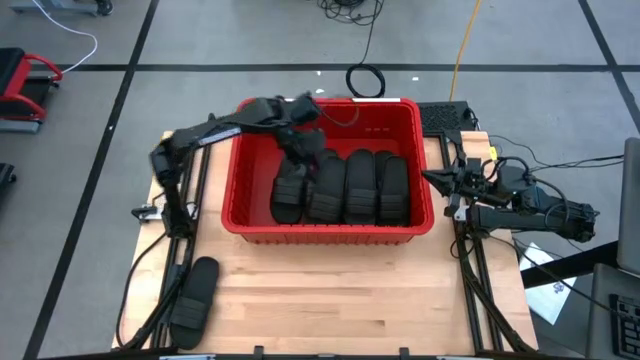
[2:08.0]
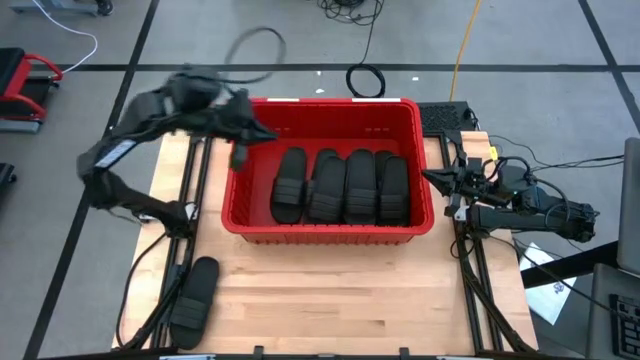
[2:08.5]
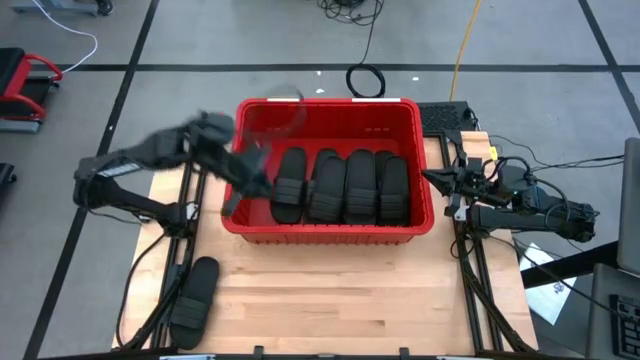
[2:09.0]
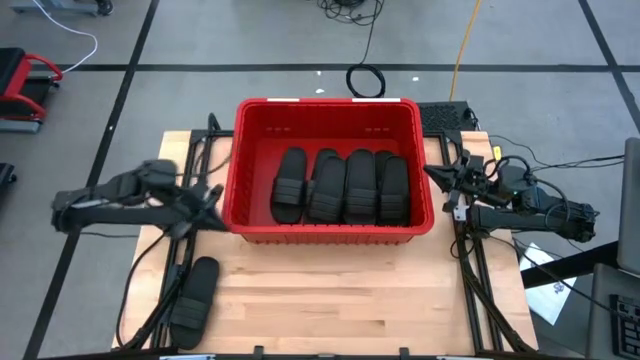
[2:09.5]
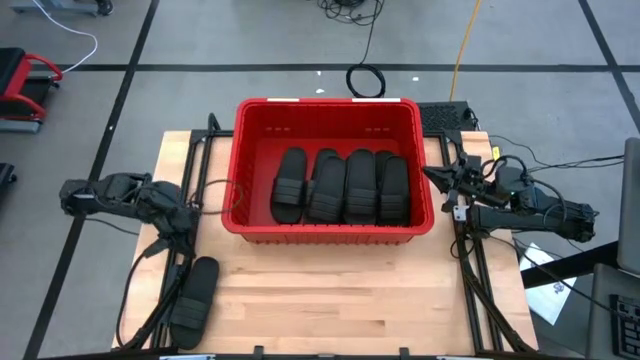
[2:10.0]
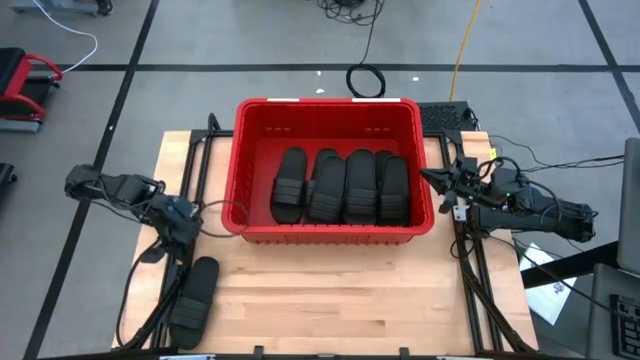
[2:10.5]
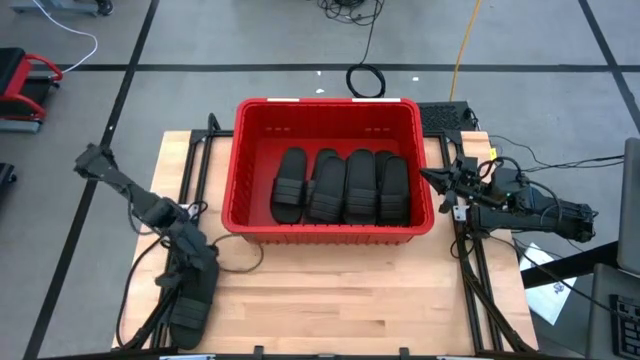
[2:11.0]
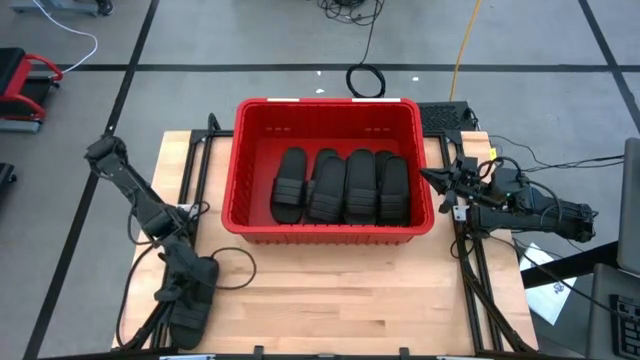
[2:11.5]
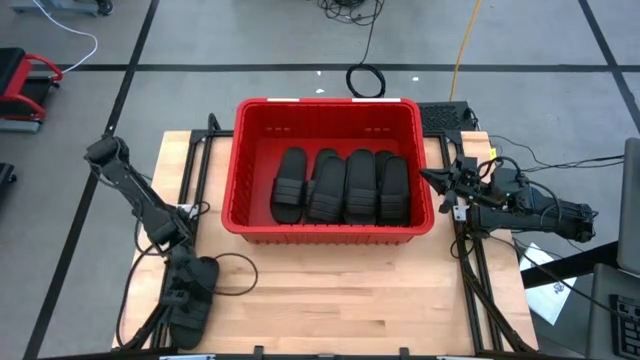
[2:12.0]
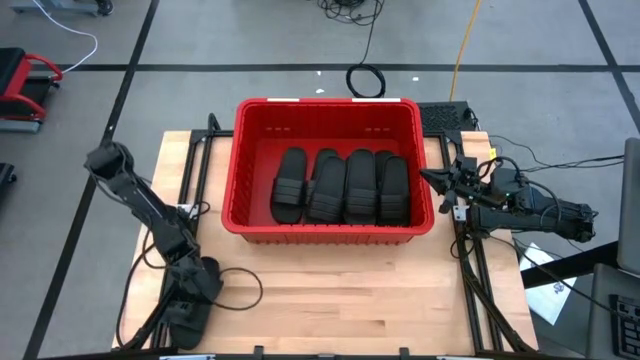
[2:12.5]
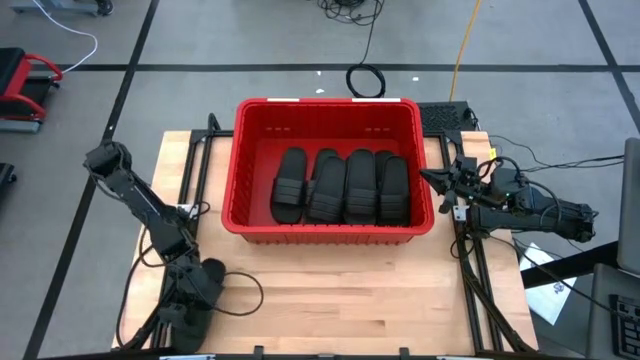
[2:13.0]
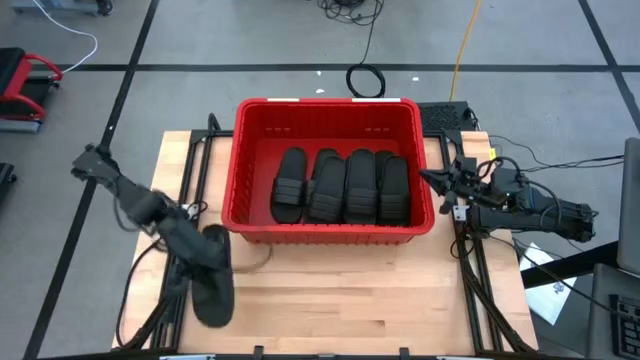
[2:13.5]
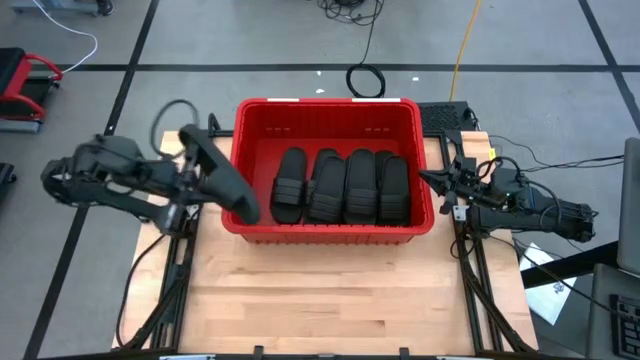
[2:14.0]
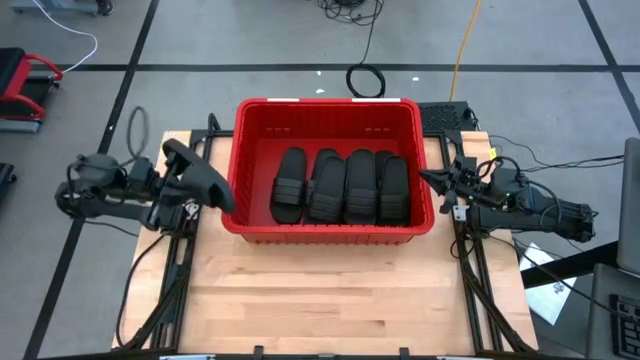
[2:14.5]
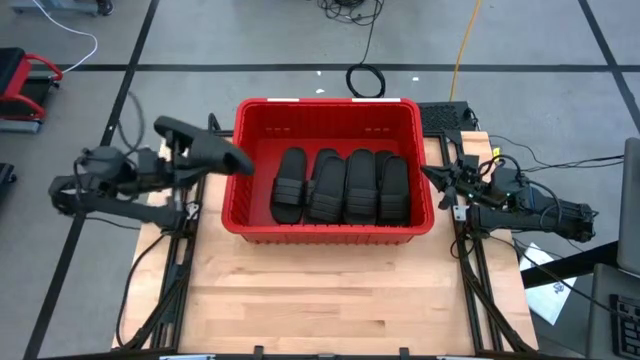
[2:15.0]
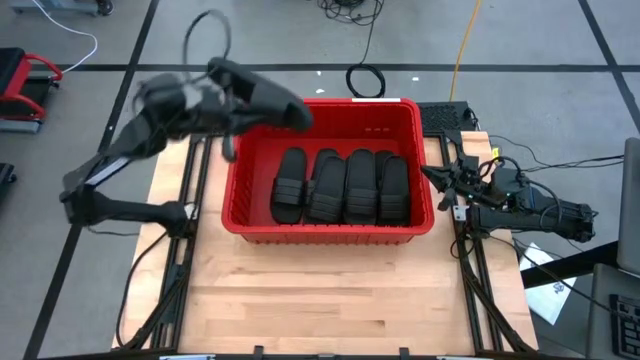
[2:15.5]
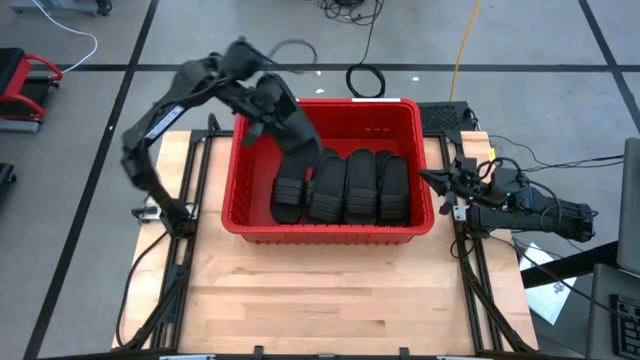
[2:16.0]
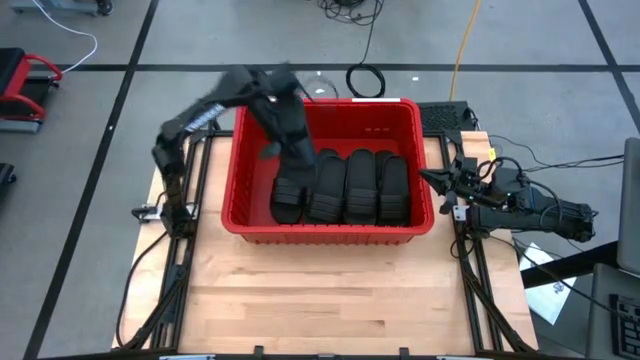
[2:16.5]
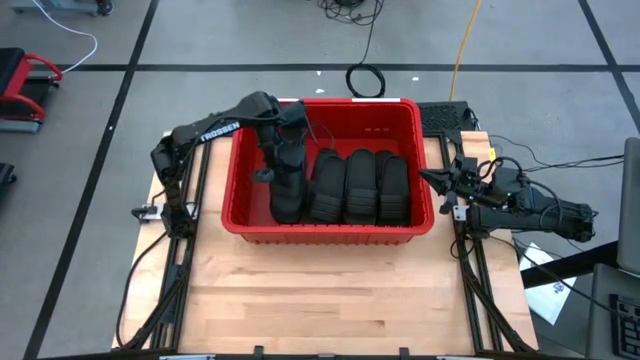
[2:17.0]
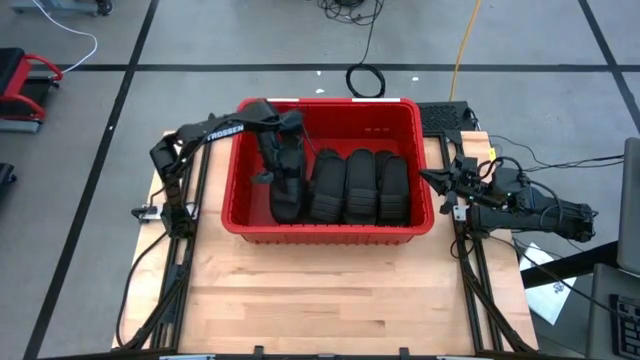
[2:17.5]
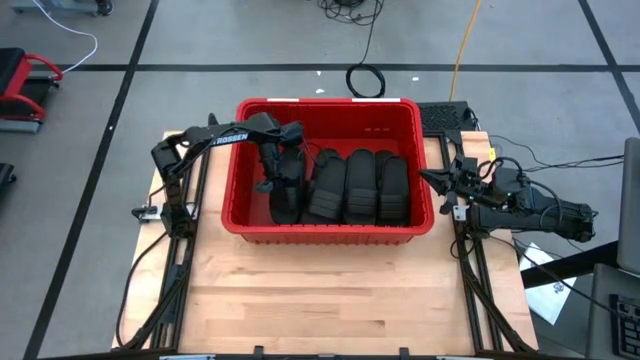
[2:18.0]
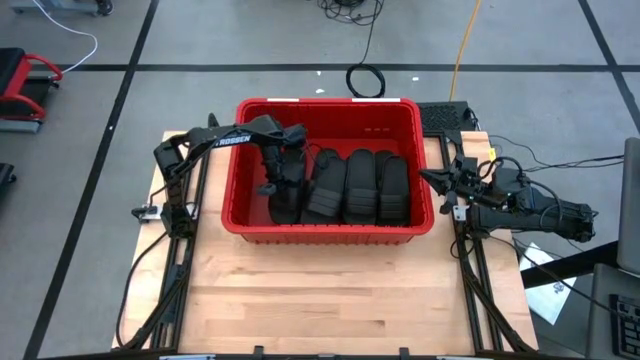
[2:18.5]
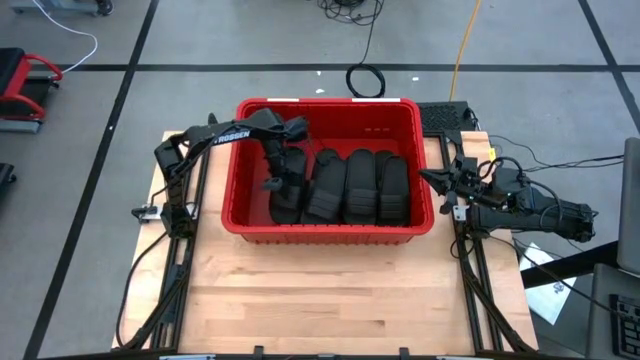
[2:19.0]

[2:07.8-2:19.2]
Task: Pick and place slides into bin
Put the black slide into the red bin

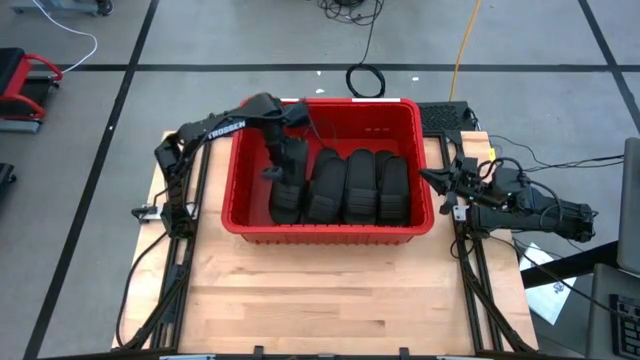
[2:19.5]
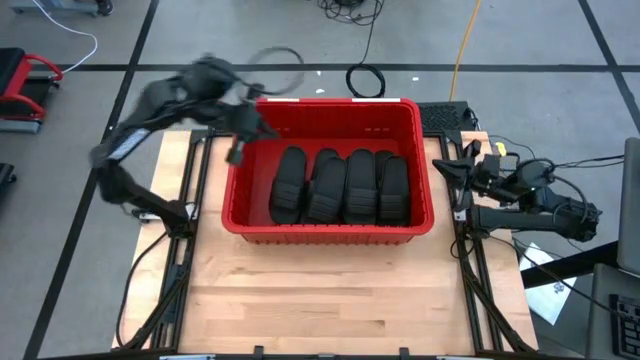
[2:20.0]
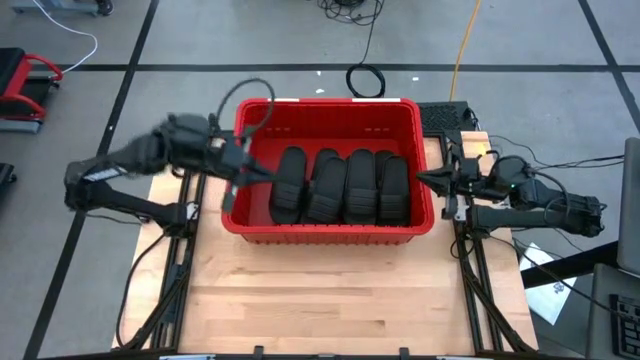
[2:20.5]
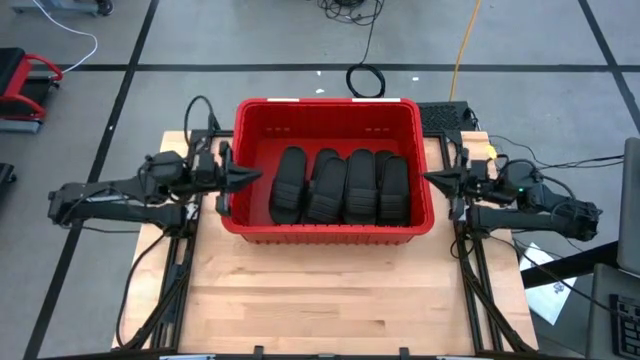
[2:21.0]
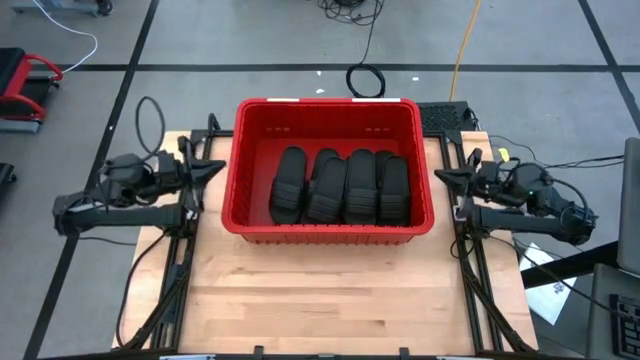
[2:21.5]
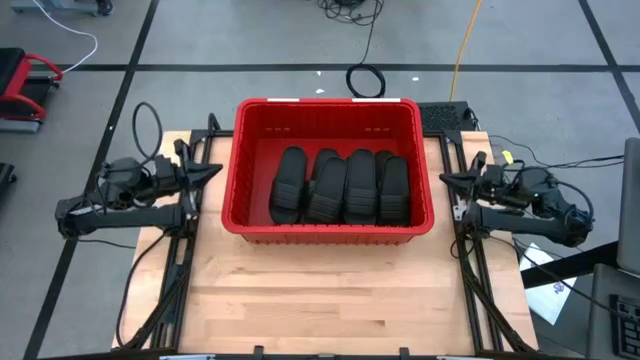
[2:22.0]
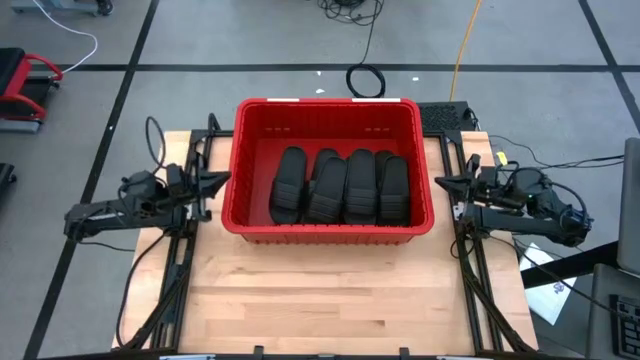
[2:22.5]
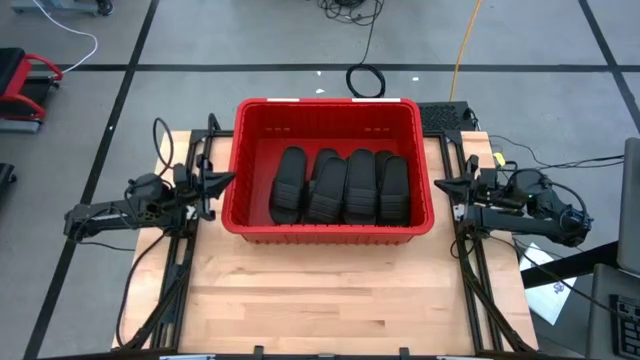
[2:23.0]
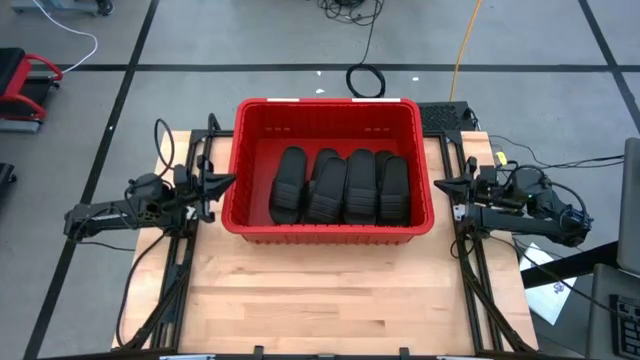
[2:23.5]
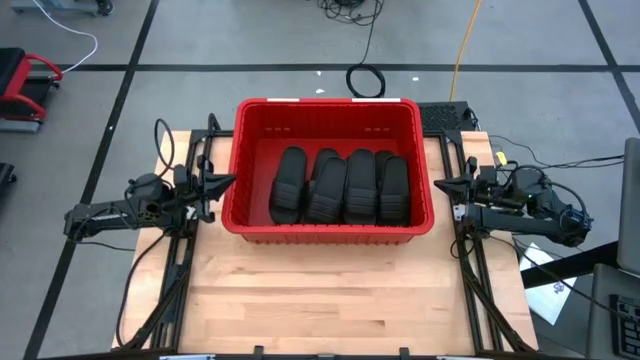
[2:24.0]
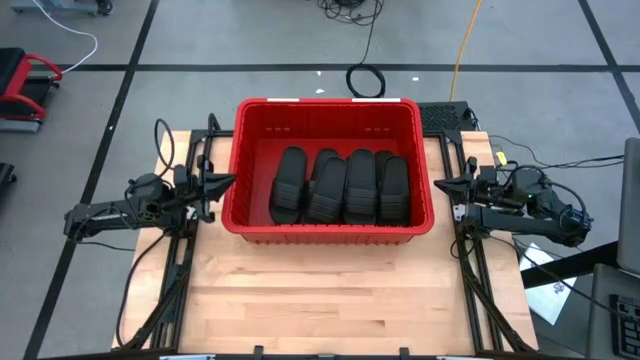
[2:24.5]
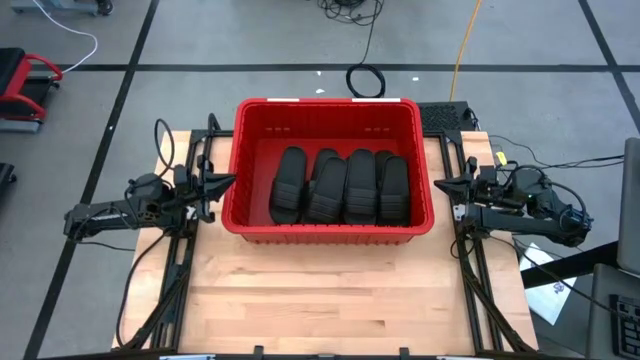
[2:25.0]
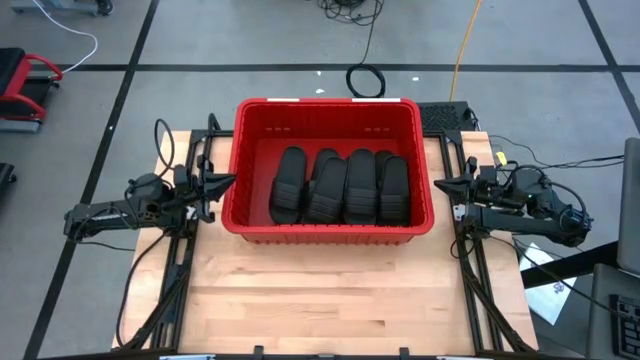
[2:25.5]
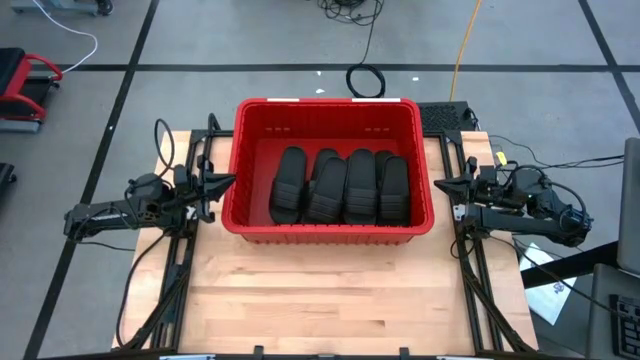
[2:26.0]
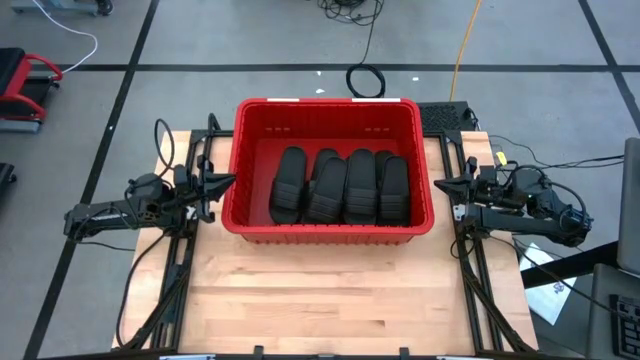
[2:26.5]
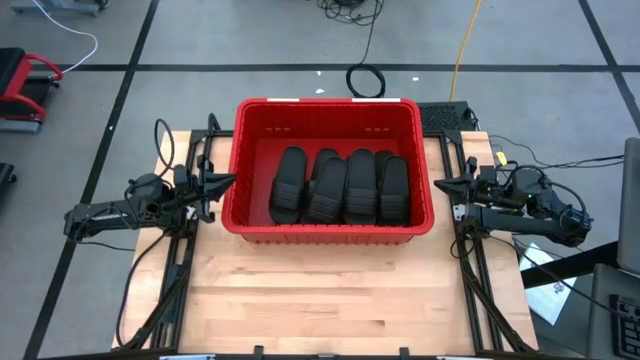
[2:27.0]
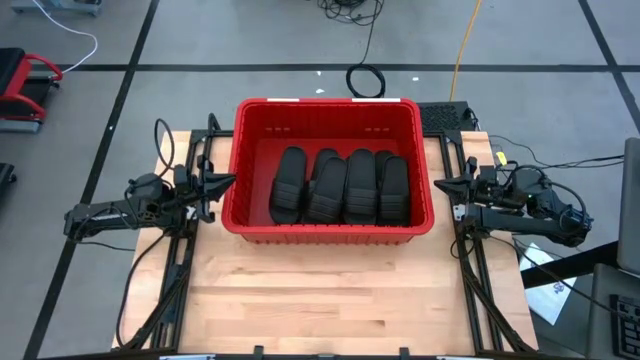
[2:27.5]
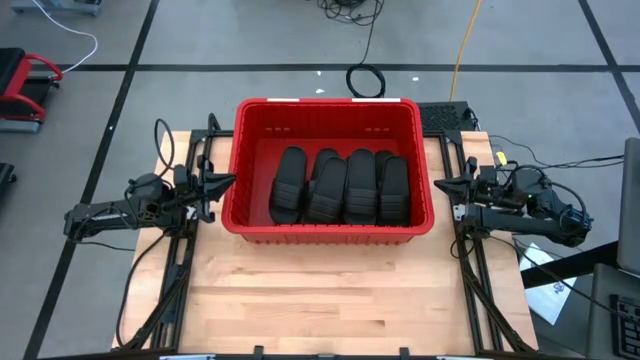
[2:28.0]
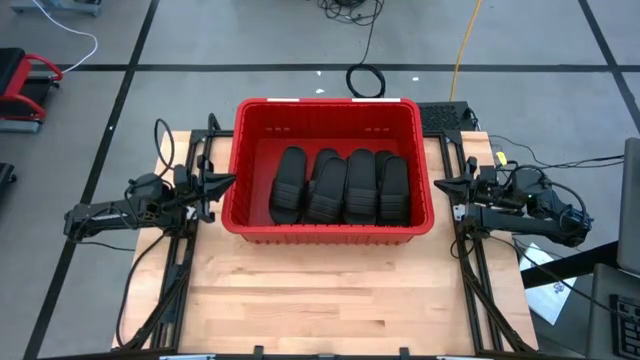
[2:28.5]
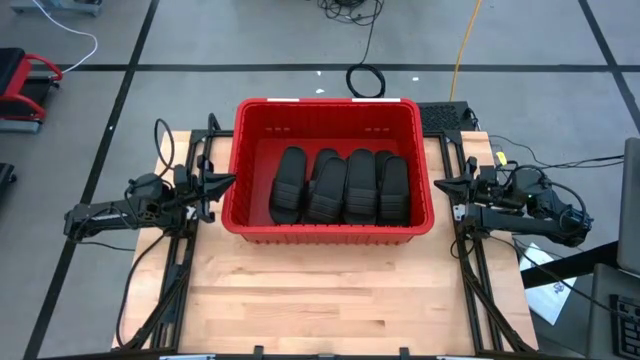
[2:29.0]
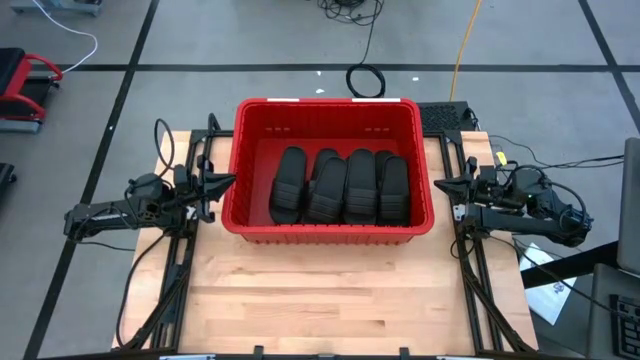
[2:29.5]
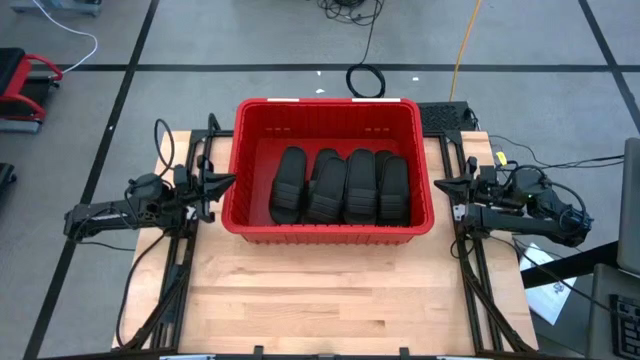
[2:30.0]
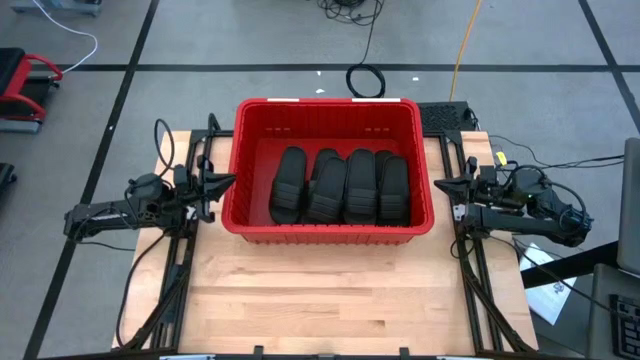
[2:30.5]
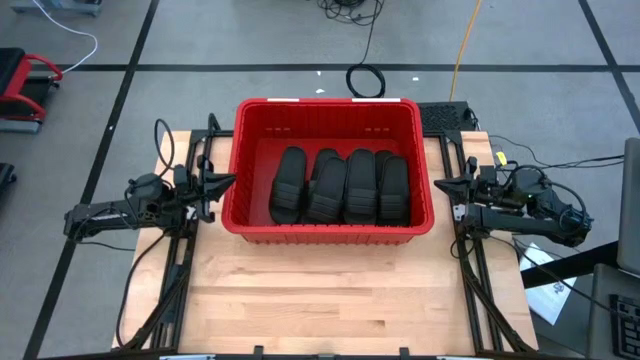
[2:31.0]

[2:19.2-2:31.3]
Return to Home Position
